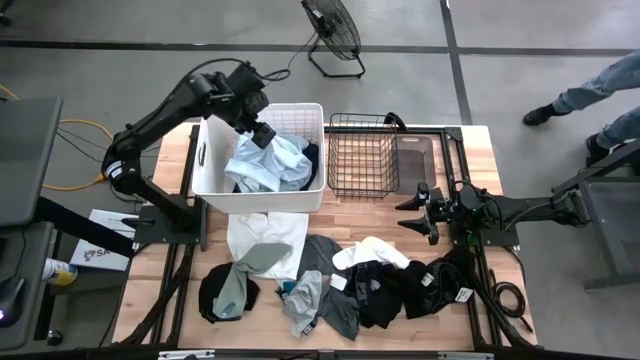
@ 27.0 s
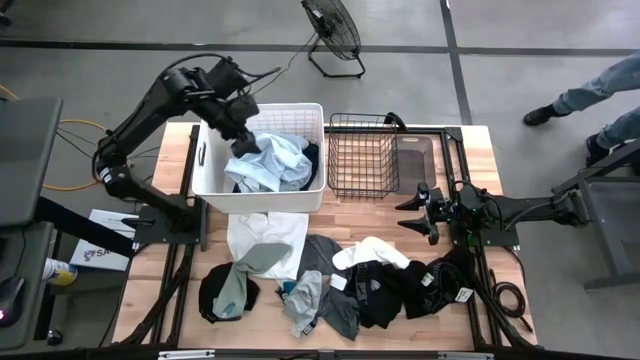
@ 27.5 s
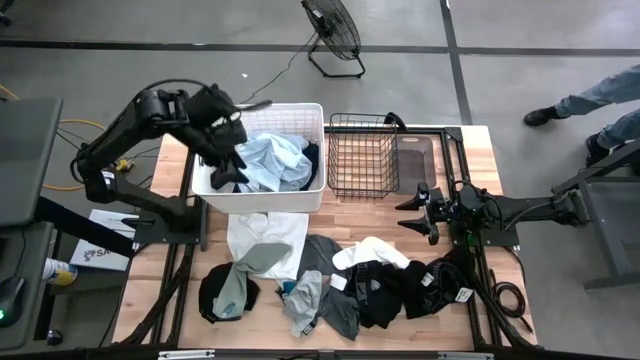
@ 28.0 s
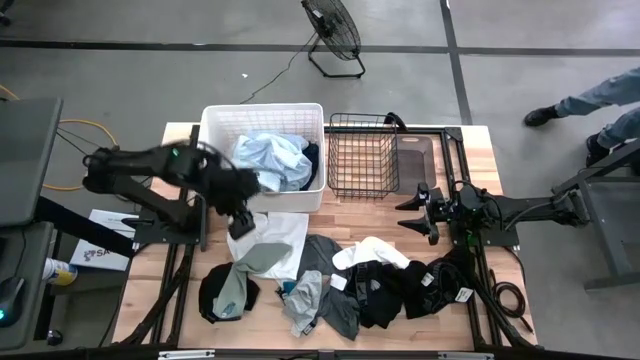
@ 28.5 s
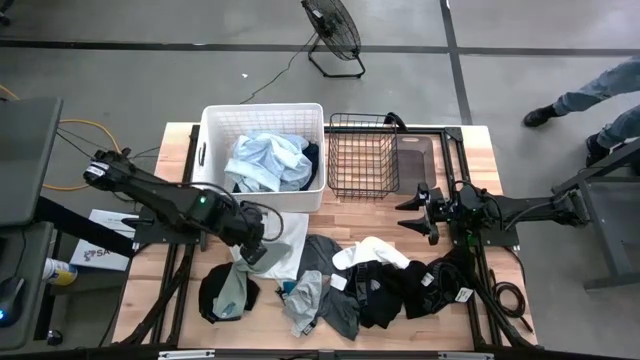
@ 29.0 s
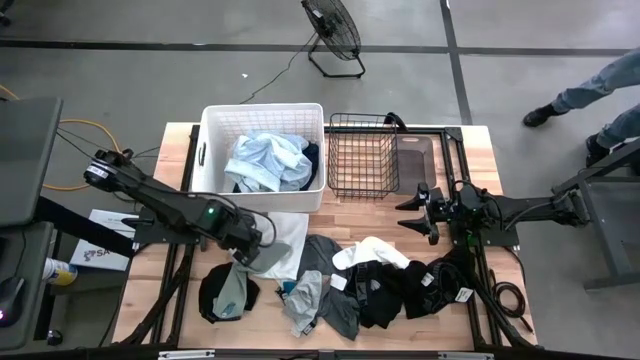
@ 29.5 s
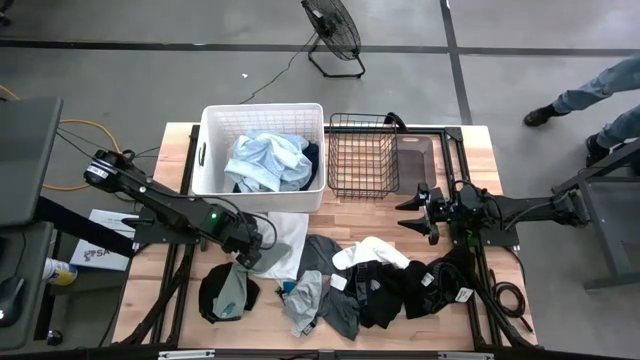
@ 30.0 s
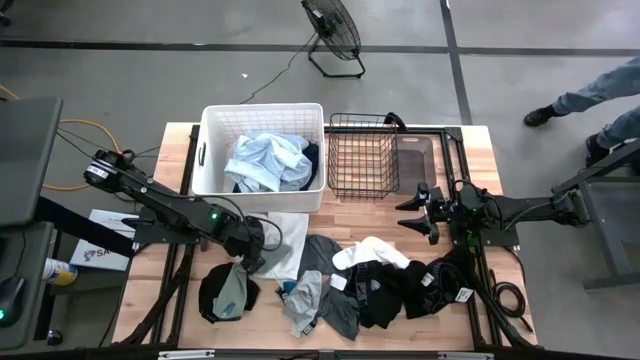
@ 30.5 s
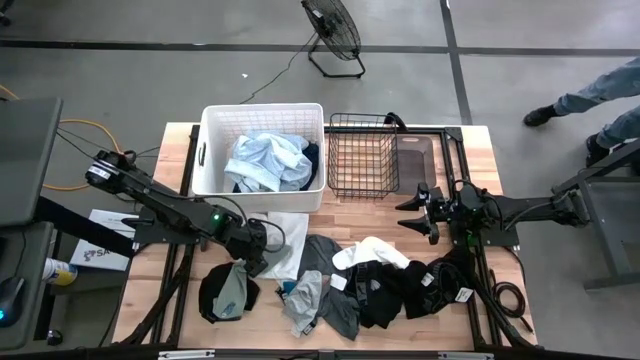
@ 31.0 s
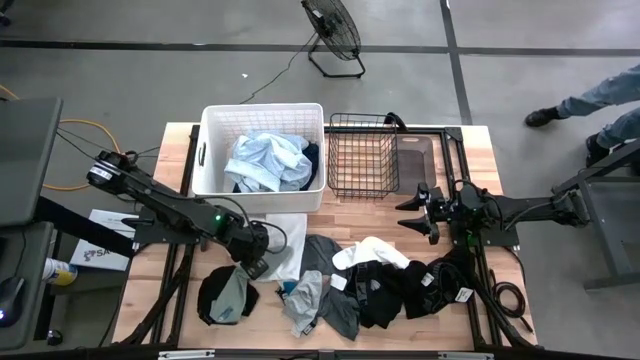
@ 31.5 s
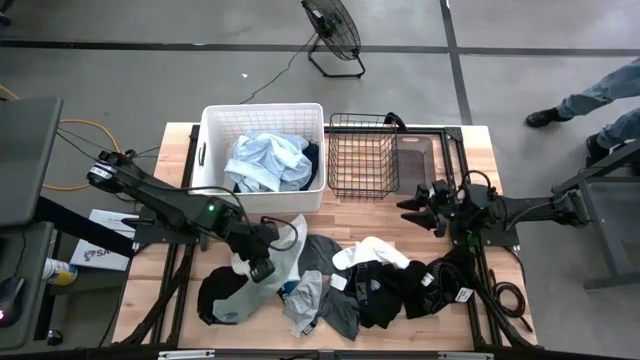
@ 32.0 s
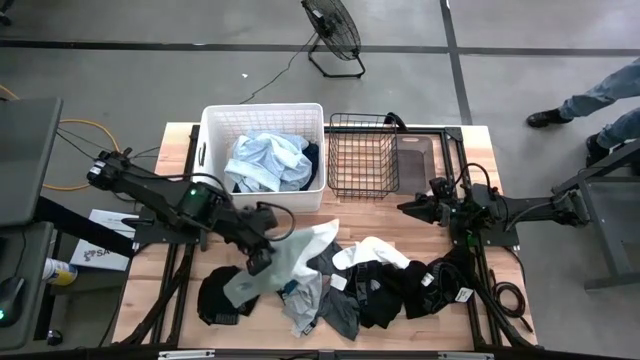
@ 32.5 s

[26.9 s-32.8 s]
Task: Pick & Place Cloths
Put the green sock into the black bin

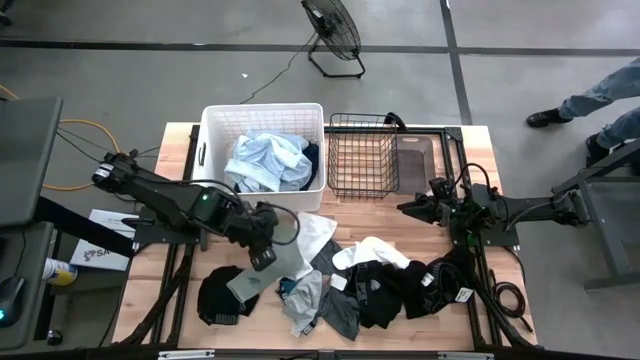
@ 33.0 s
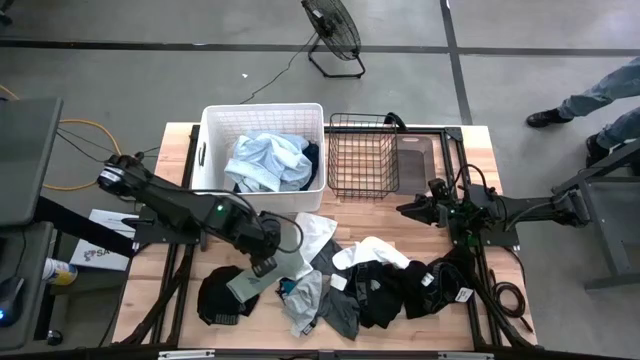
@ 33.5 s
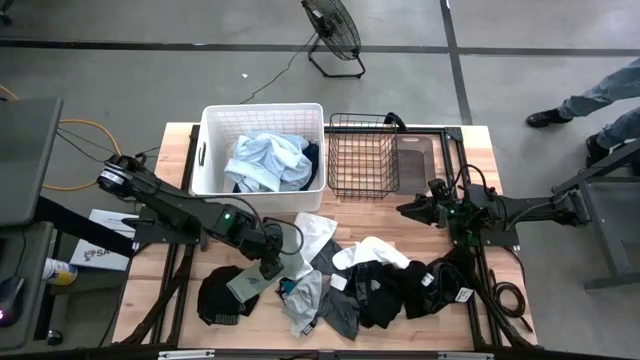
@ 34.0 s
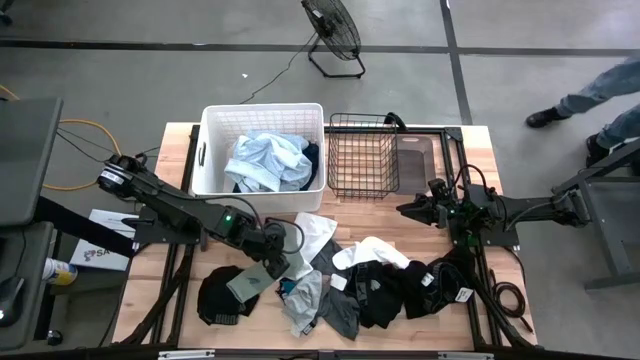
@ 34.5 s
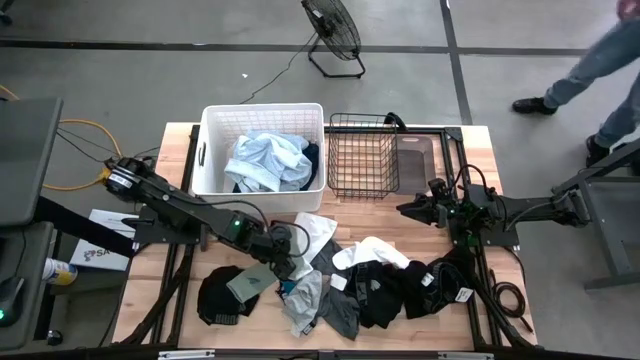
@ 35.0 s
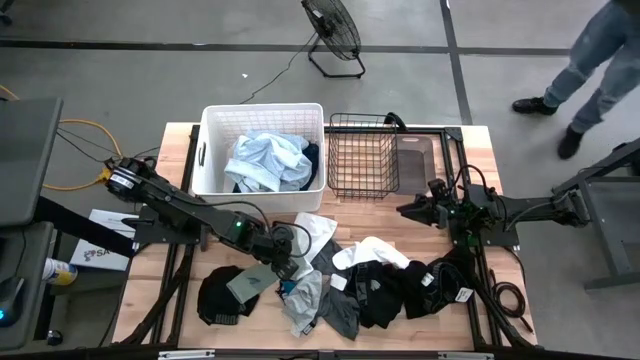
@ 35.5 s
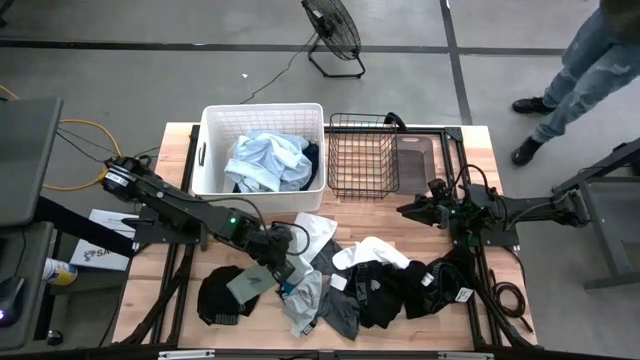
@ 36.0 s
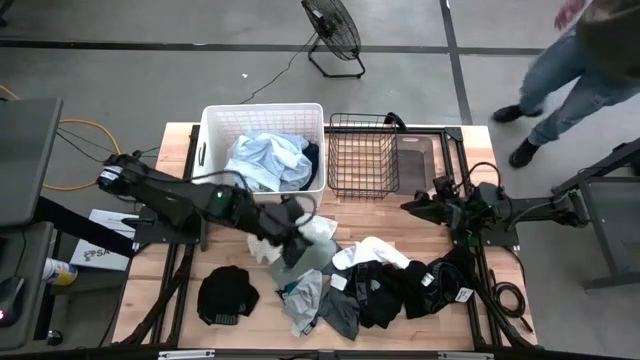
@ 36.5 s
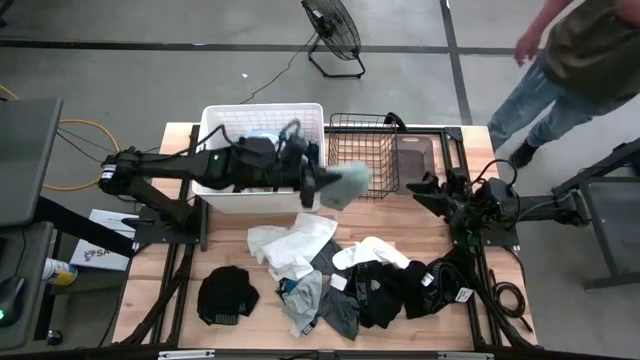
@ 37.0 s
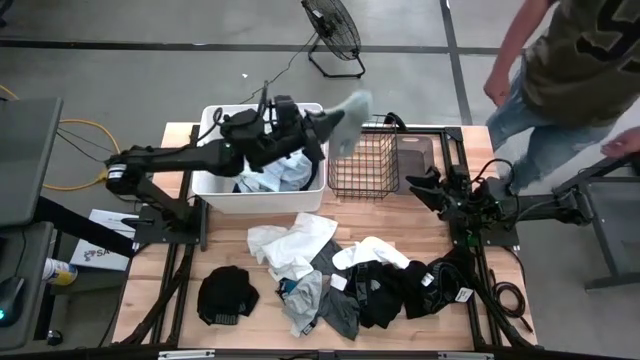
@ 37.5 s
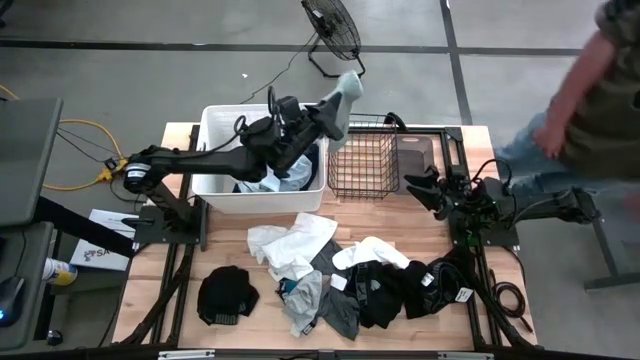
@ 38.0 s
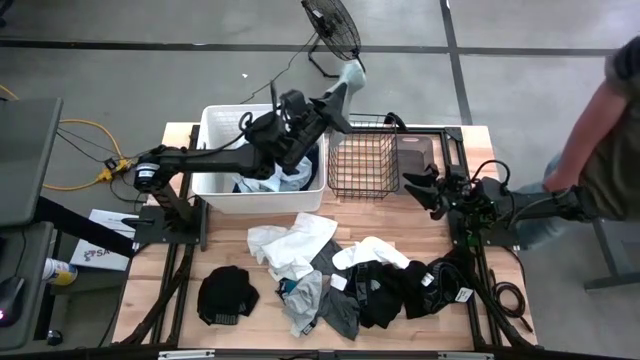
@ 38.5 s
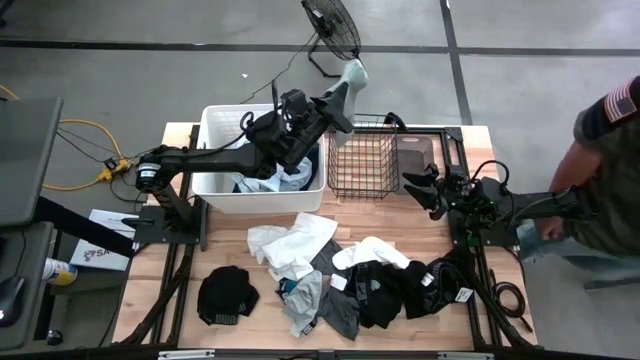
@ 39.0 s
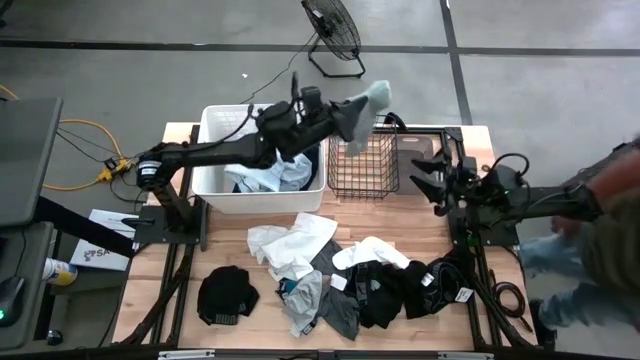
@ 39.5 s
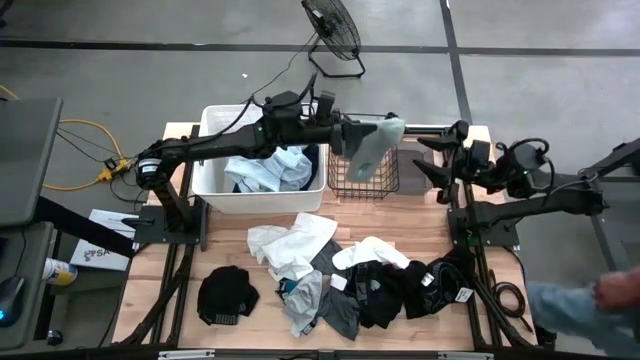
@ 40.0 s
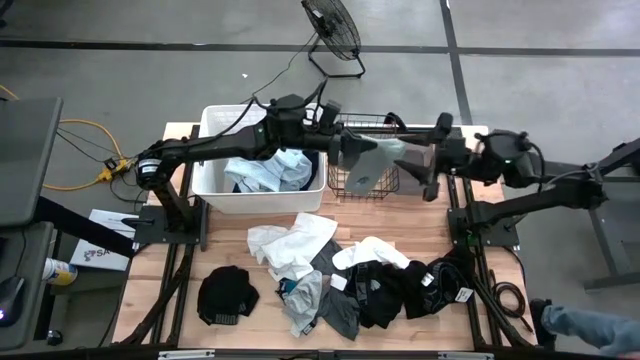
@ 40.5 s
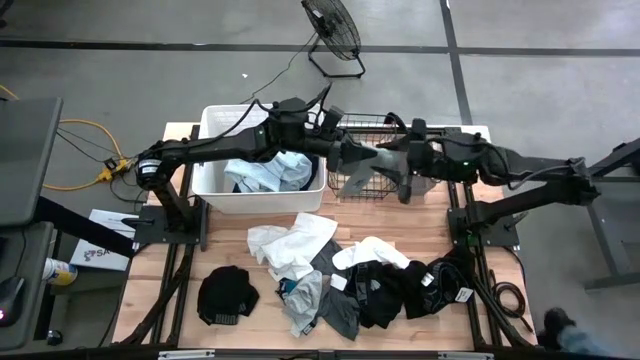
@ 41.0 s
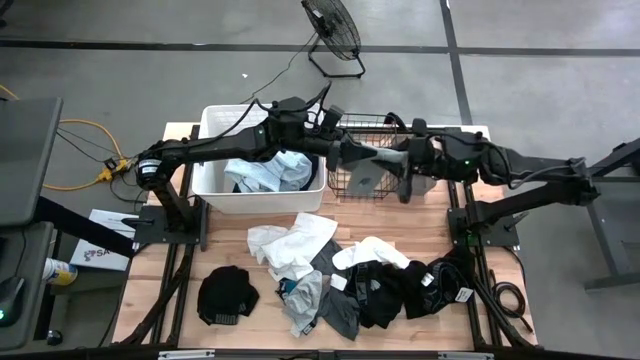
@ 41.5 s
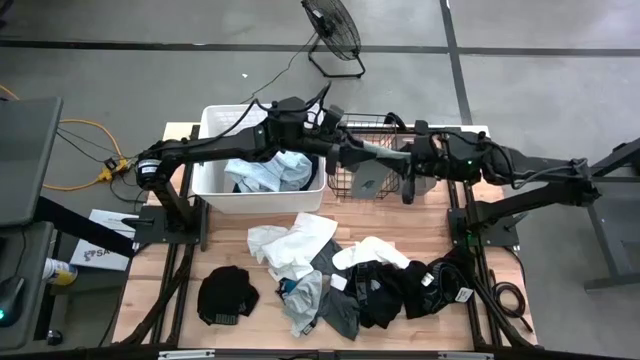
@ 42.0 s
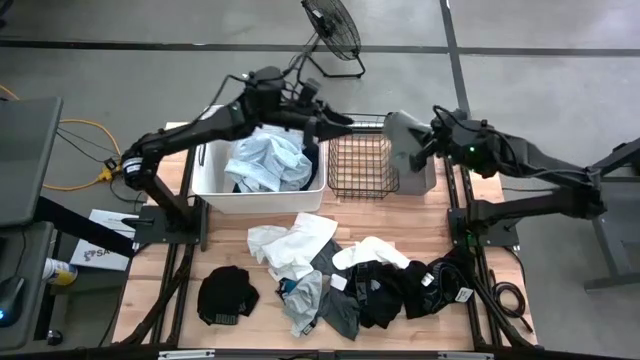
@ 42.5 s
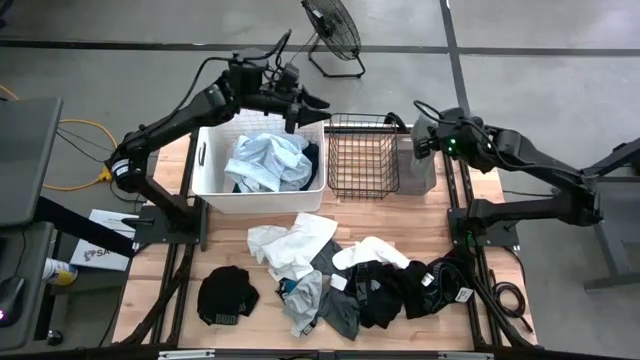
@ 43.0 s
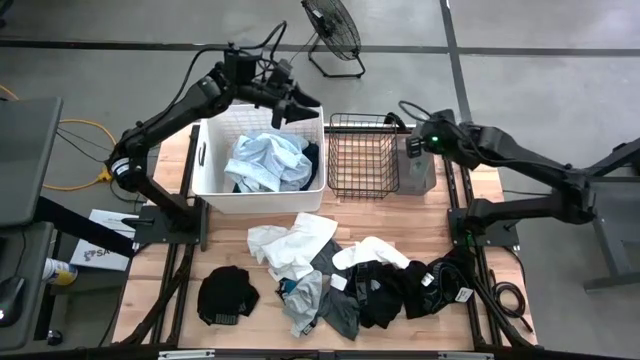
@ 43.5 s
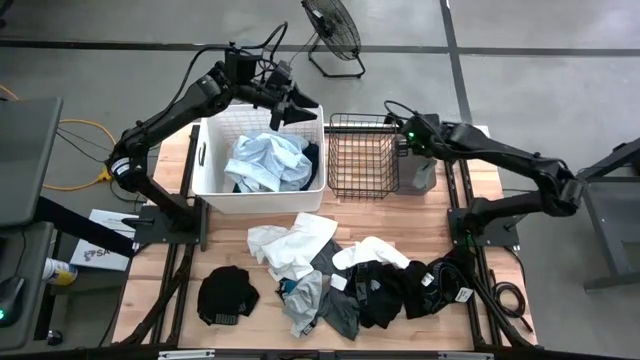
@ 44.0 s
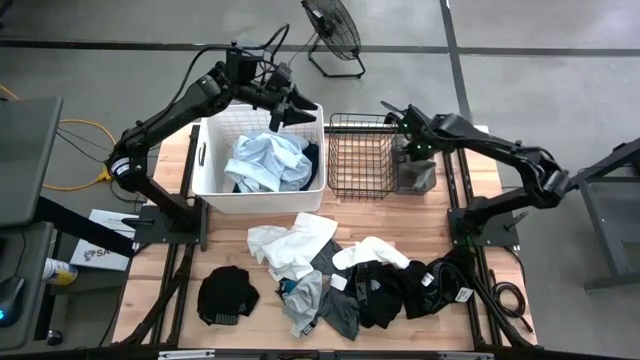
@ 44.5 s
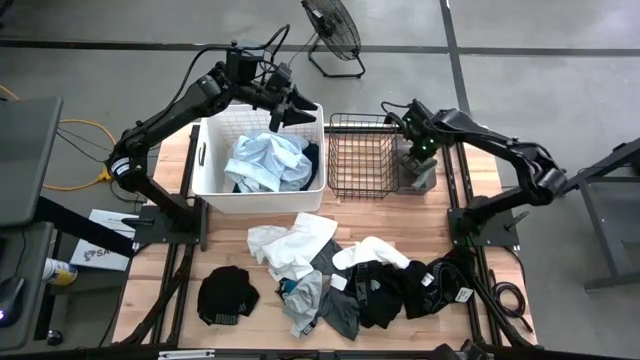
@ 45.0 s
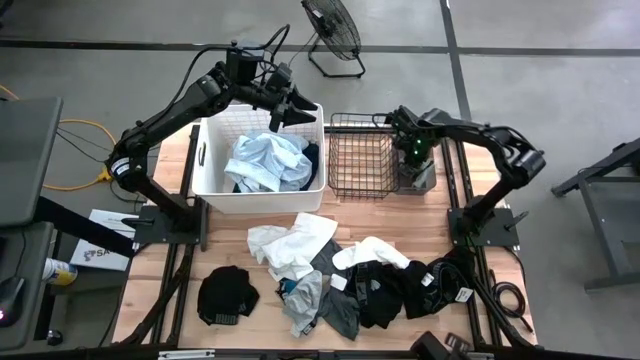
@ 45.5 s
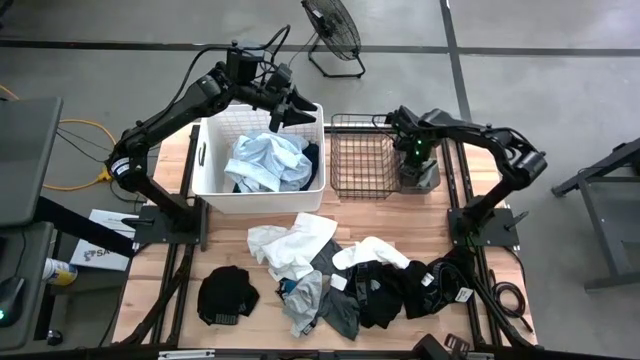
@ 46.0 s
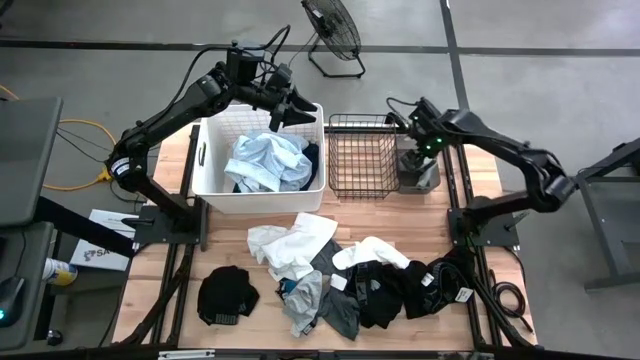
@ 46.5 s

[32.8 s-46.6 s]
Put the green sock into the black bin

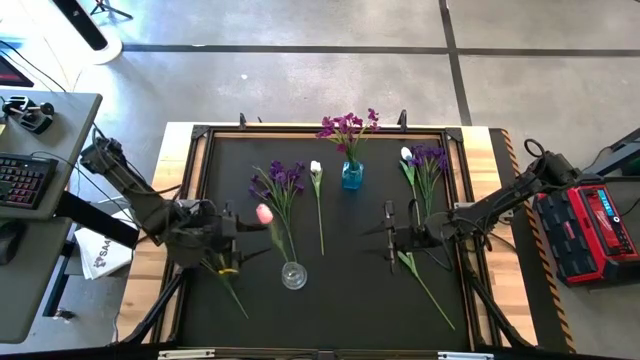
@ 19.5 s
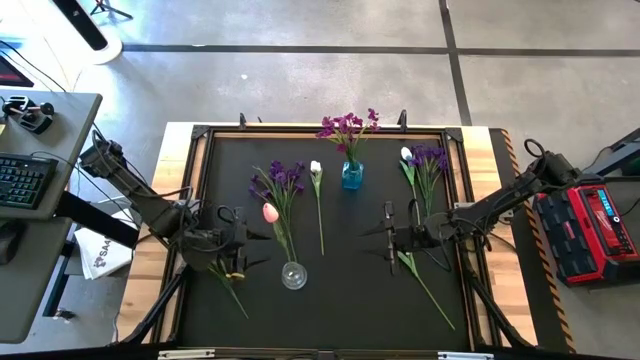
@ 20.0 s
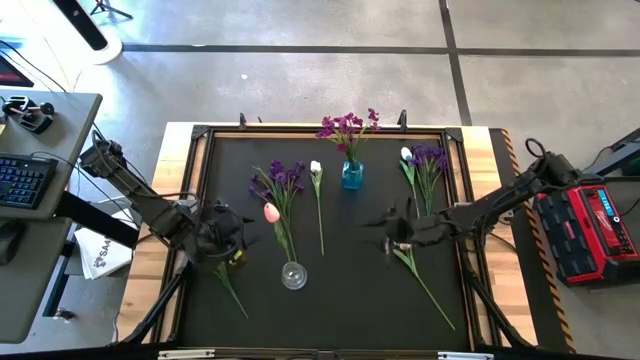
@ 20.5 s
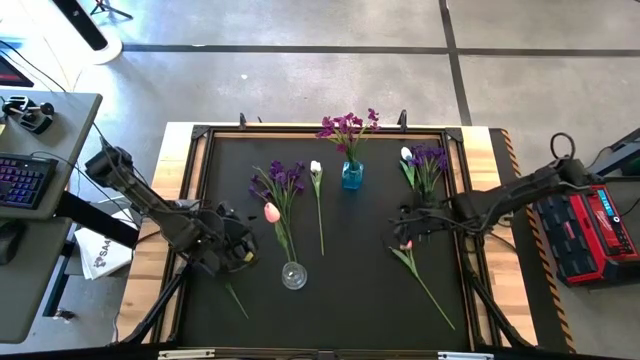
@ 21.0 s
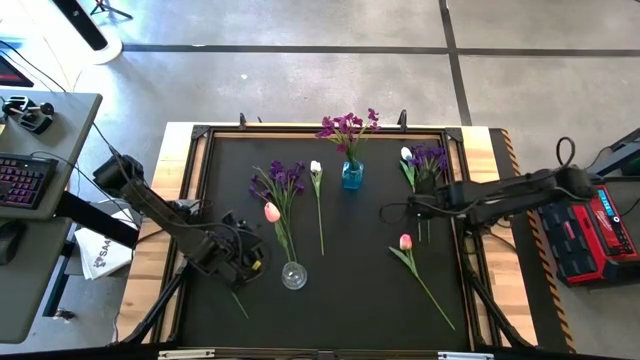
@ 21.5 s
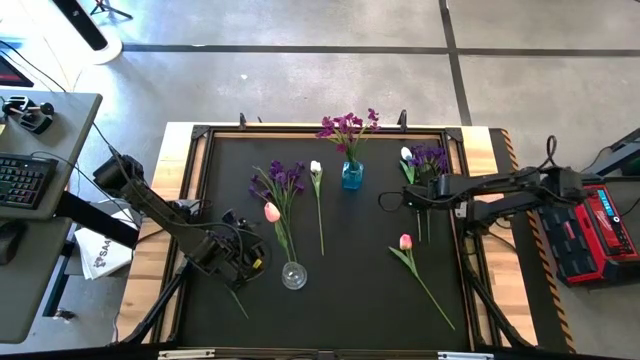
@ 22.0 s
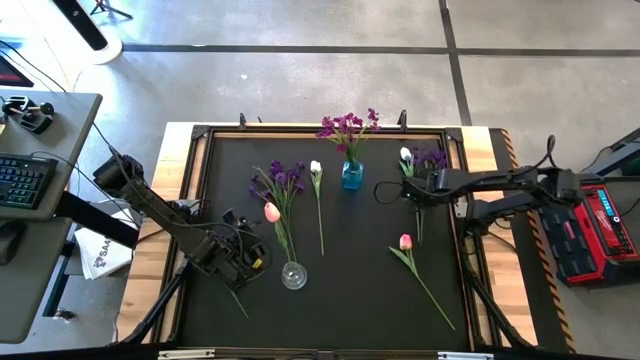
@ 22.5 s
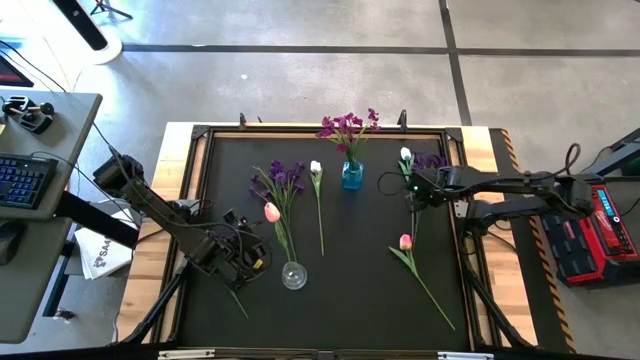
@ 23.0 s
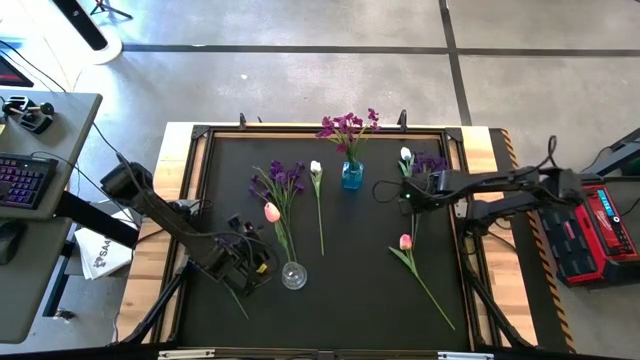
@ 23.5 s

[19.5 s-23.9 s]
Task: Sort flowers into vase by color
Put the right dark violet flower into the blue vase
